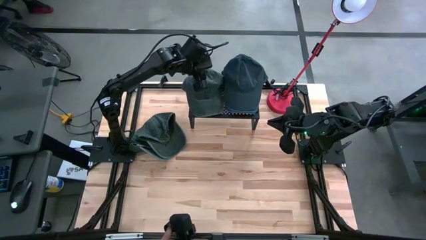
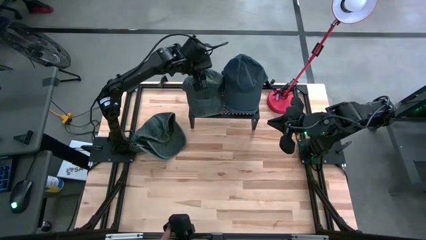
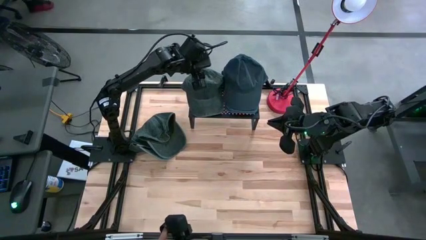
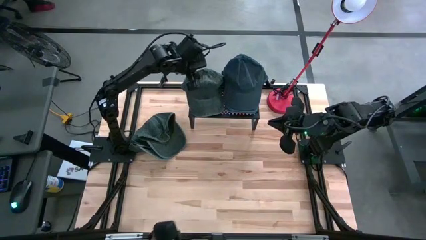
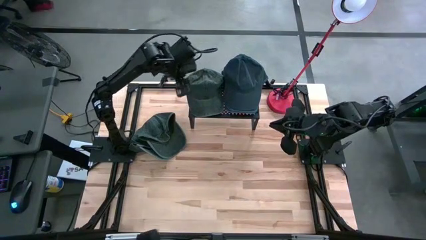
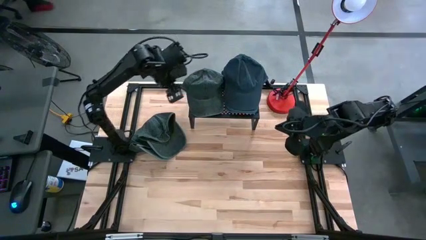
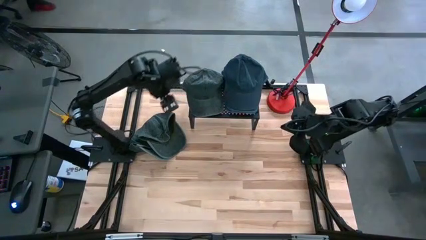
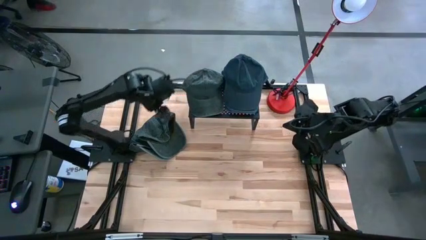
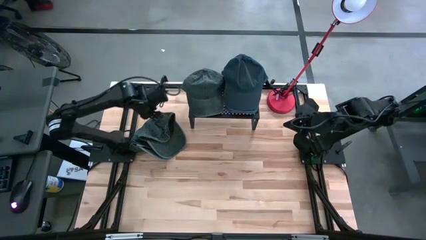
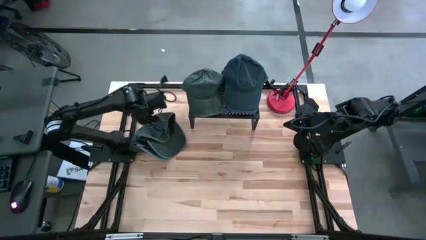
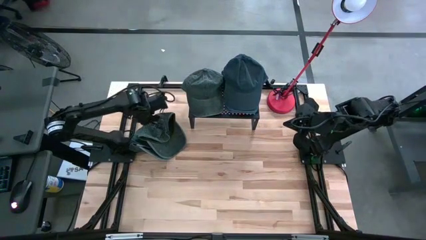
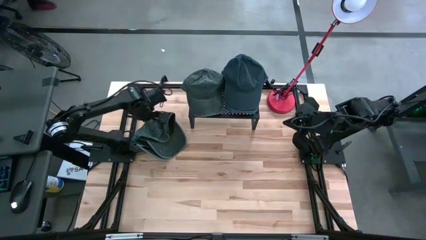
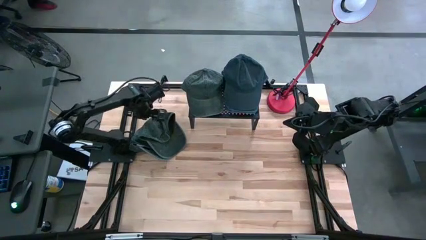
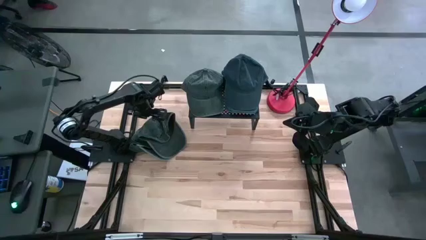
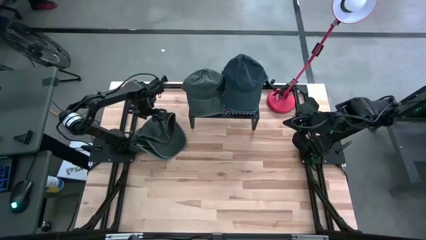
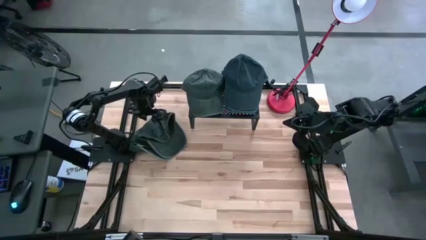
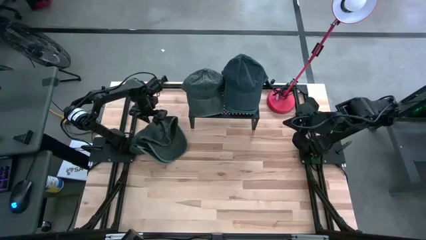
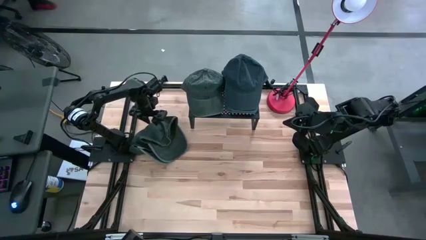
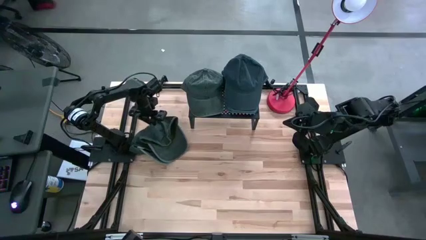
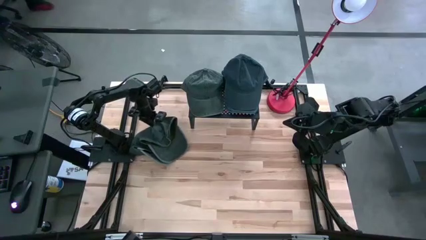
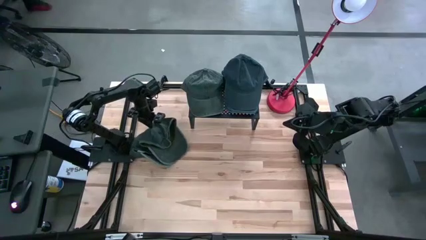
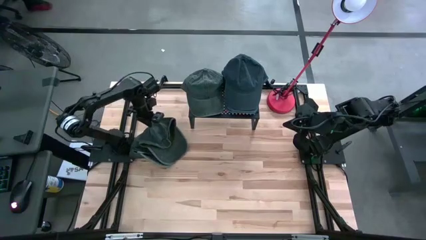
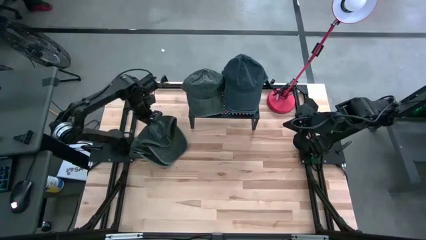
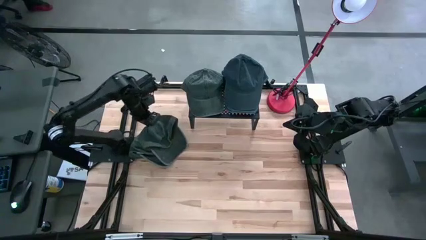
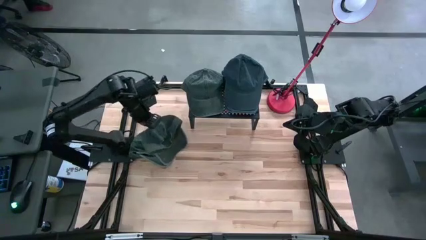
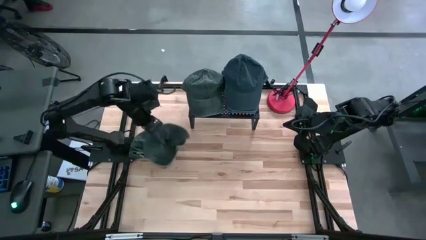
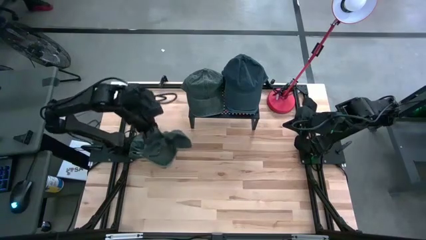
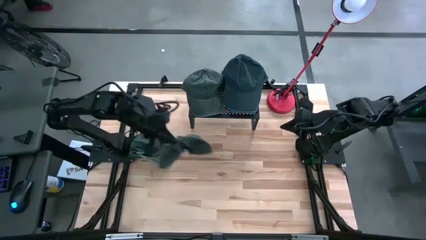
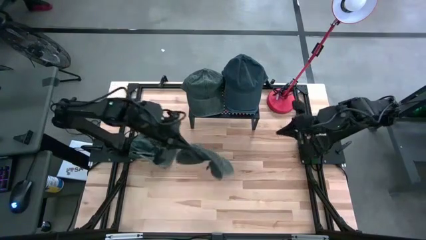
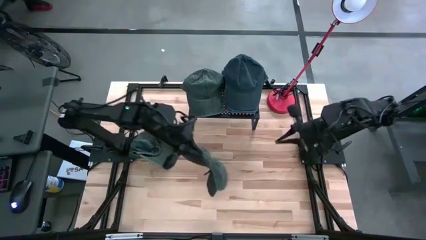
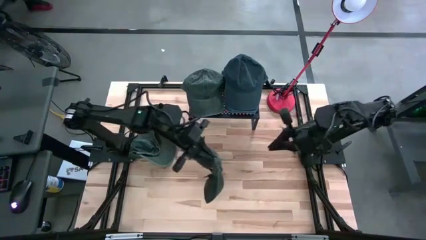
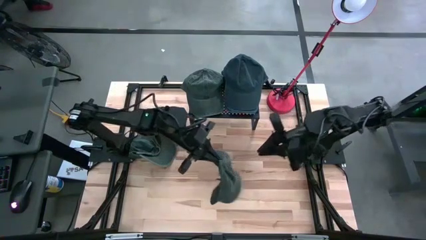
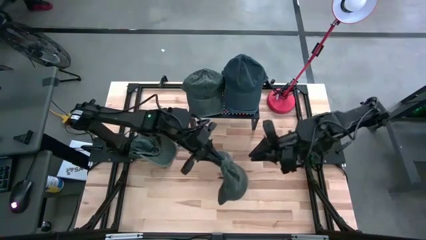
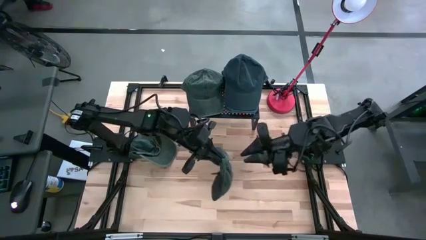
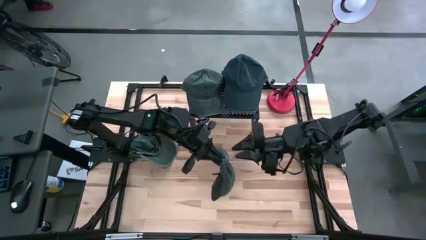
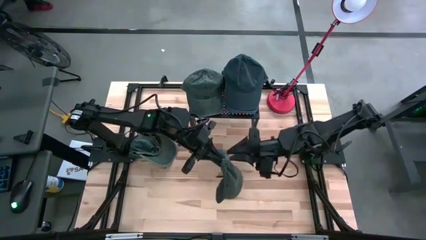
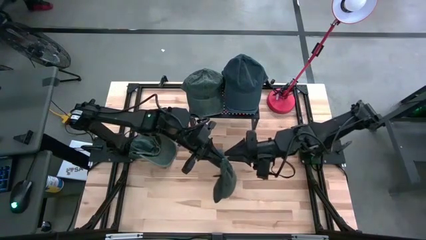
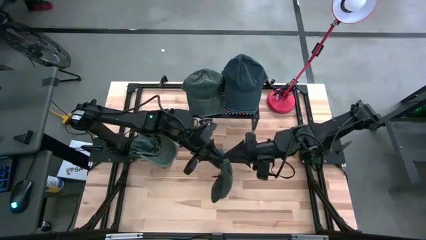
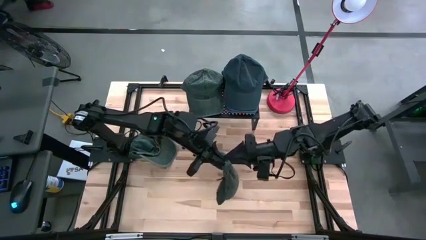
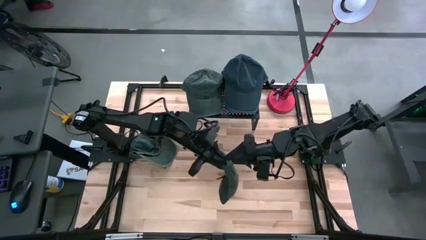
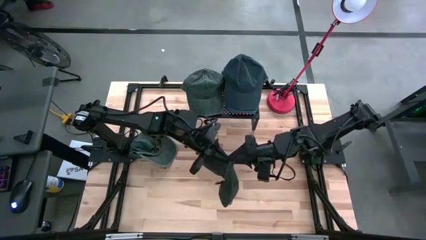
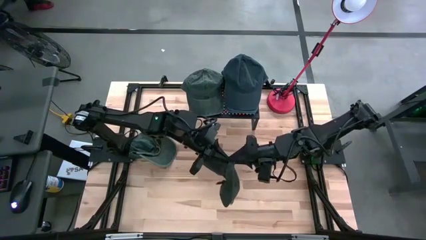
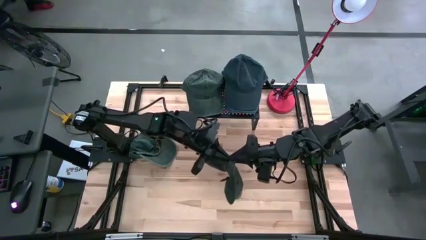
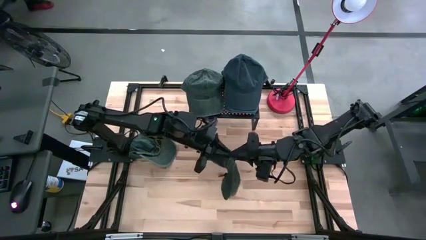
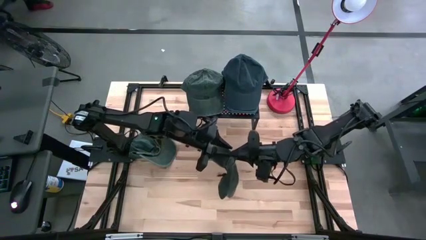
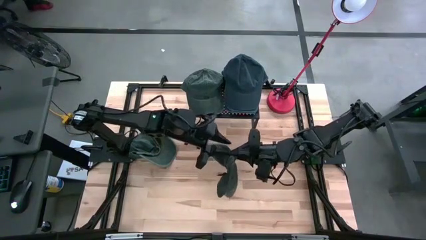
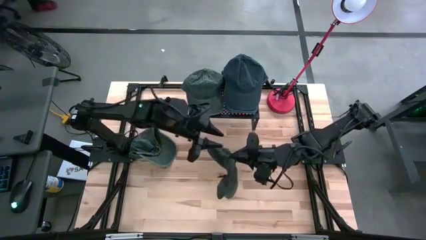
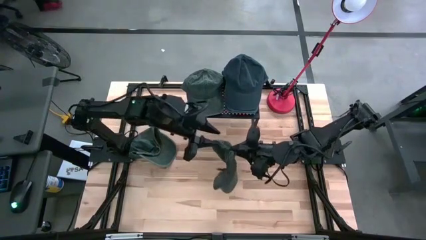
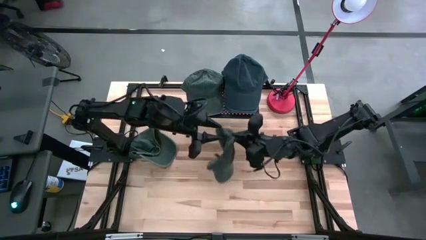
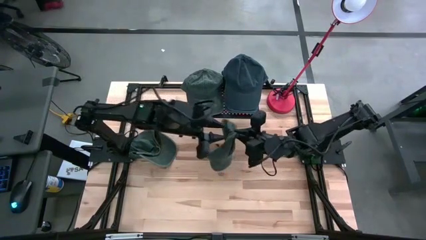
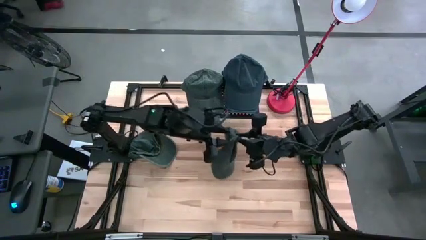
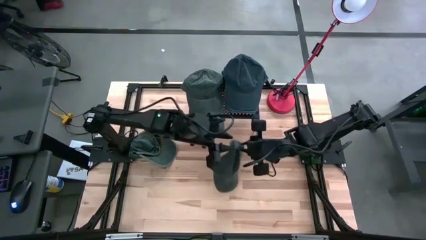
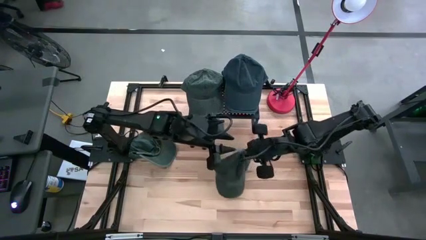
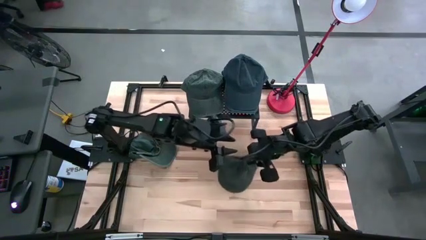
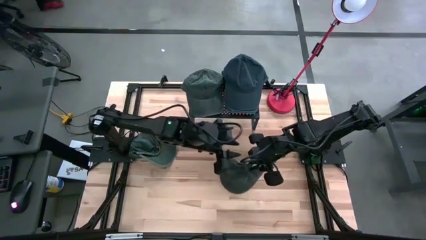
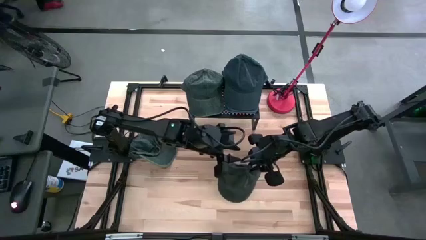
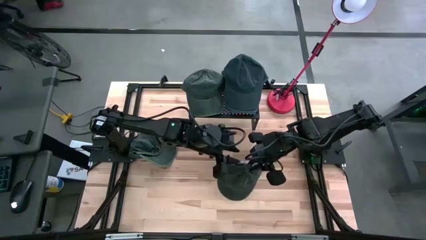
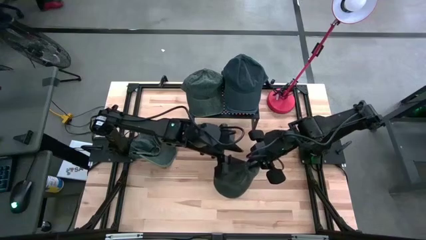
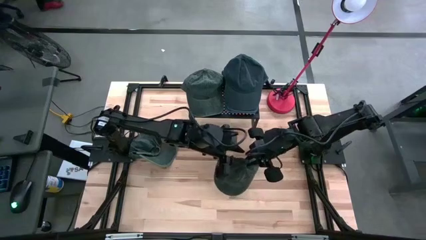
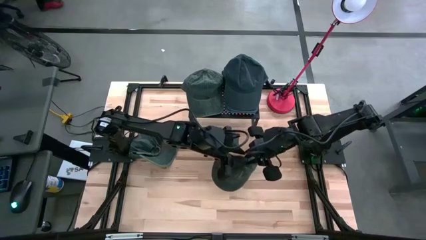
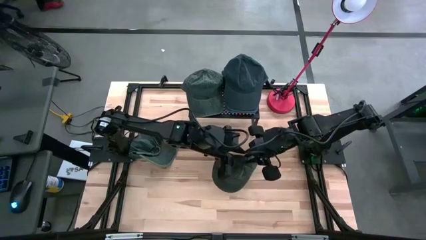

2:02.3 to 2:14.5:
Task: Pick & Place hat
Stack the right dark green cap on top of the other dark green cap on the shelf

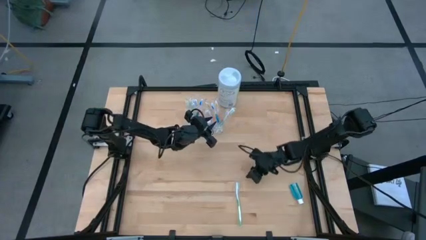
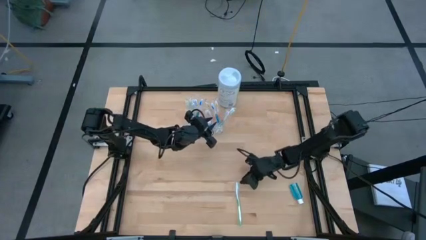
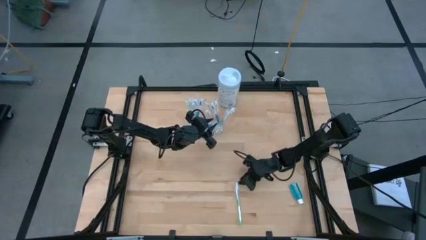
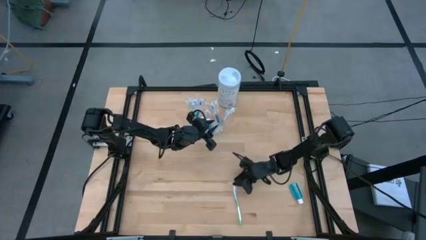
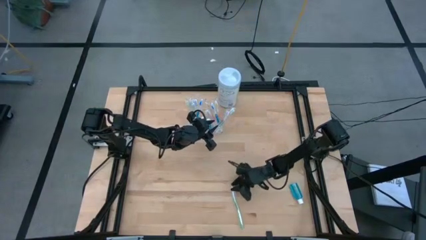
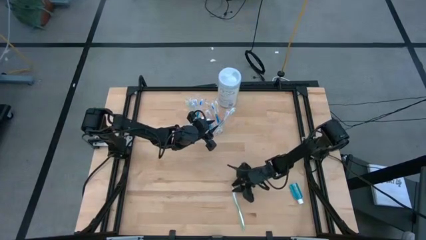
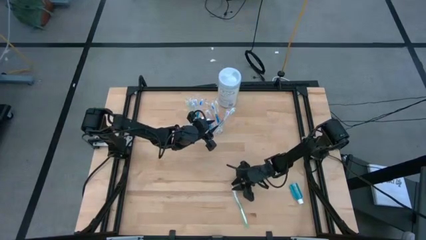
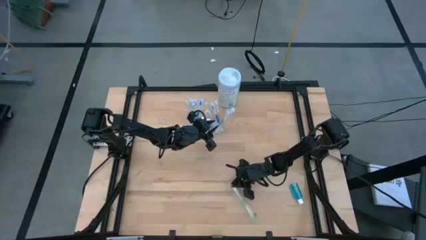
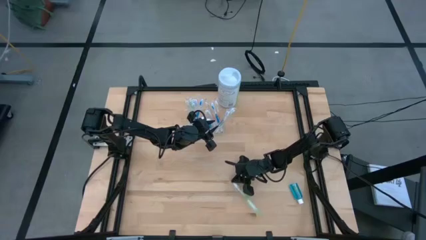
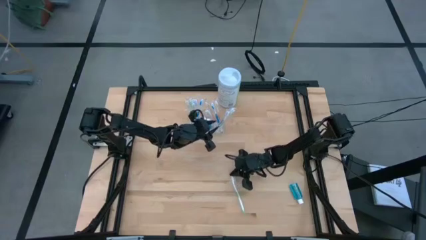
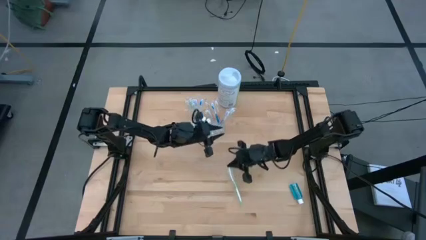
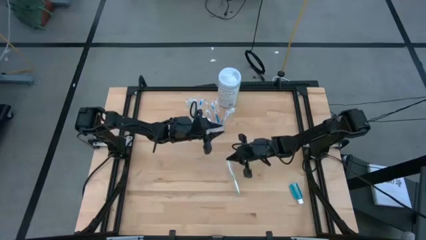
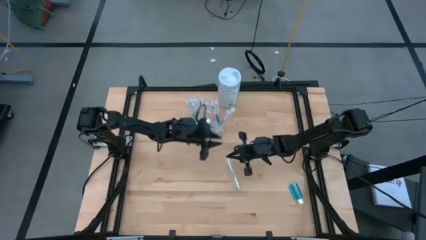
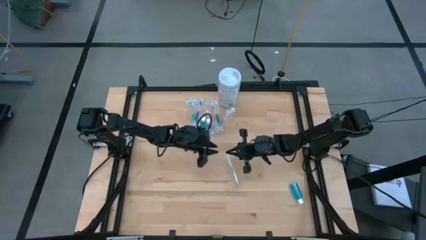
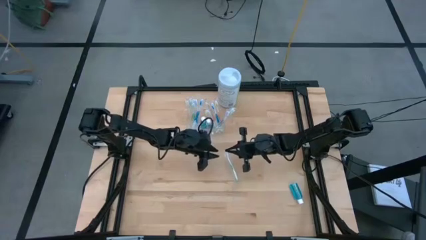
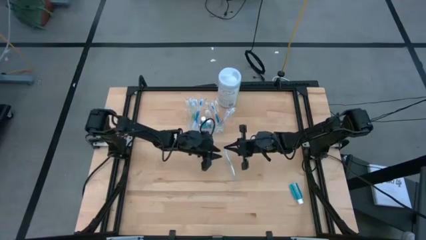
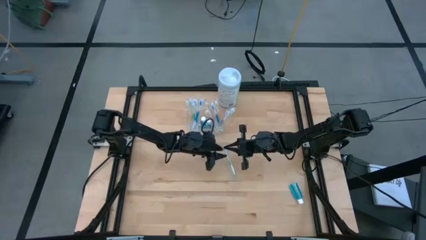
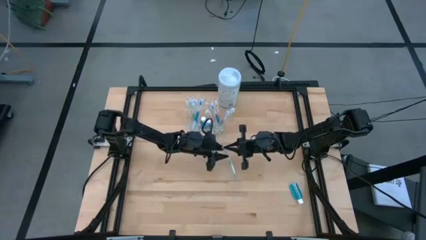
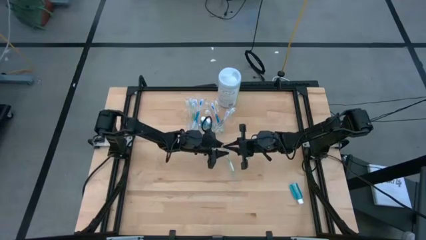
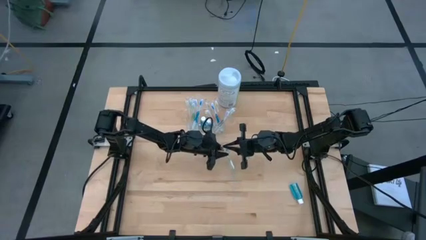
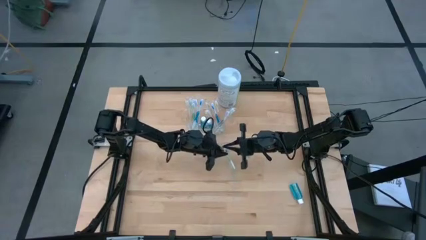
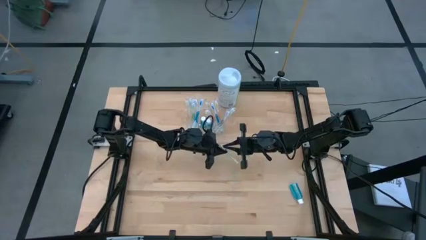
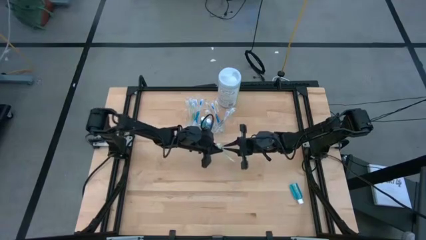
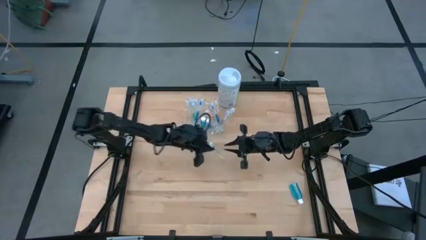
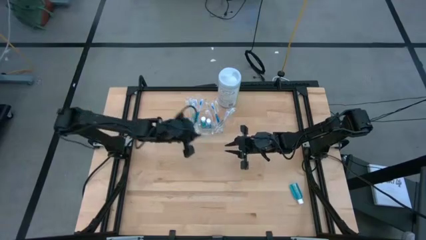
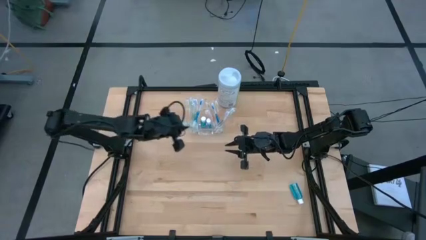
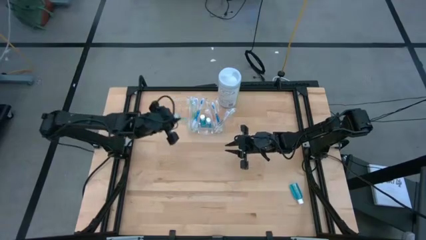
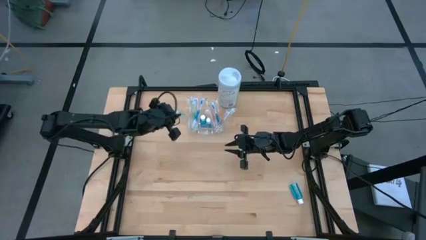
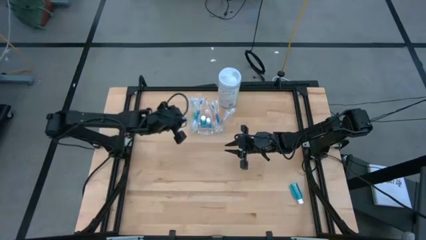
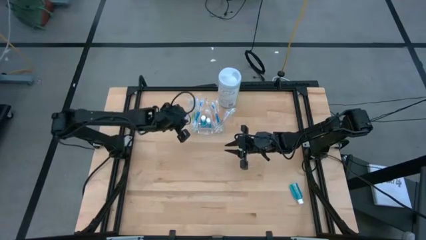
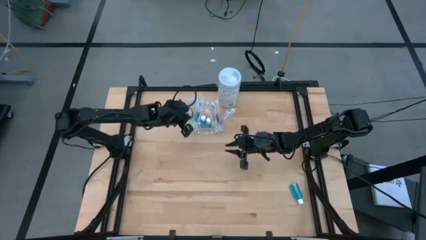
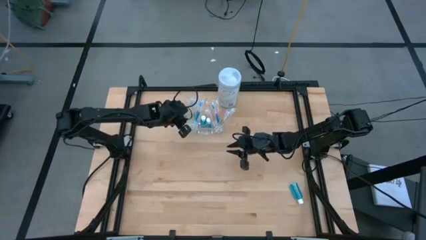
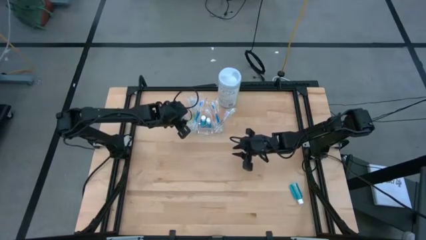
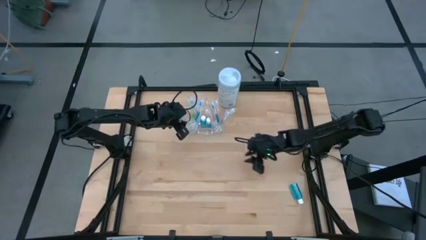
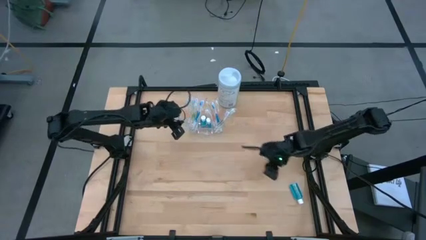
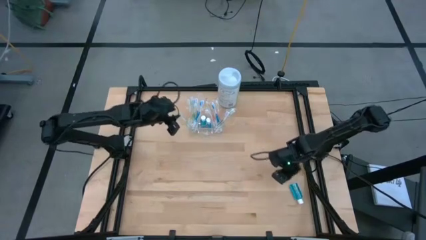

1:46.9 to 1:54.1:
Task: Pick & Place toothbrushing station
Put the green toothbrush into the transparent organizer
